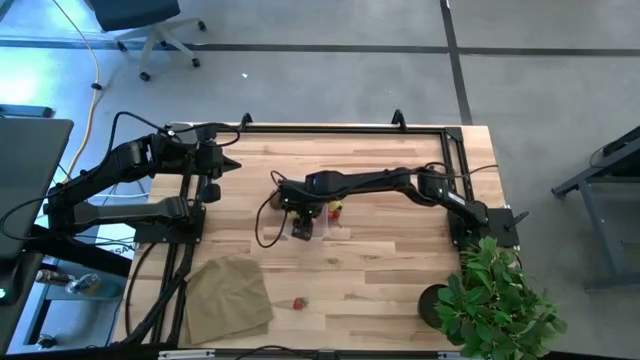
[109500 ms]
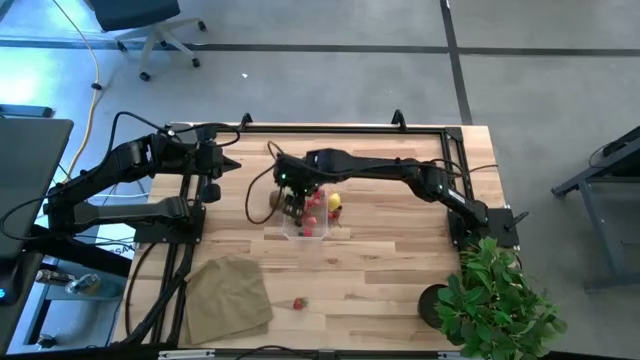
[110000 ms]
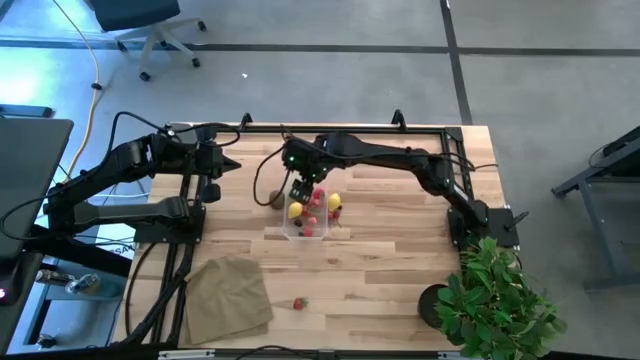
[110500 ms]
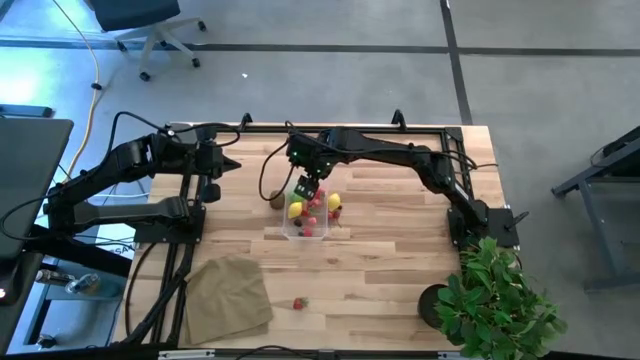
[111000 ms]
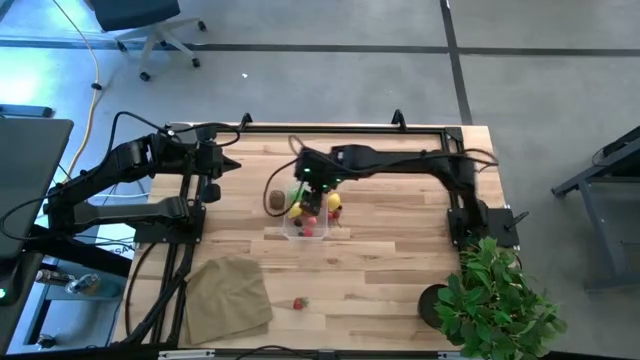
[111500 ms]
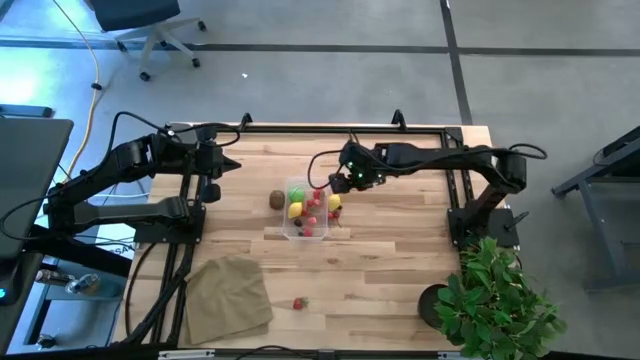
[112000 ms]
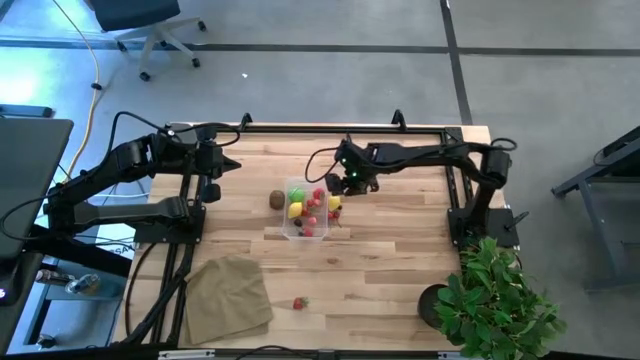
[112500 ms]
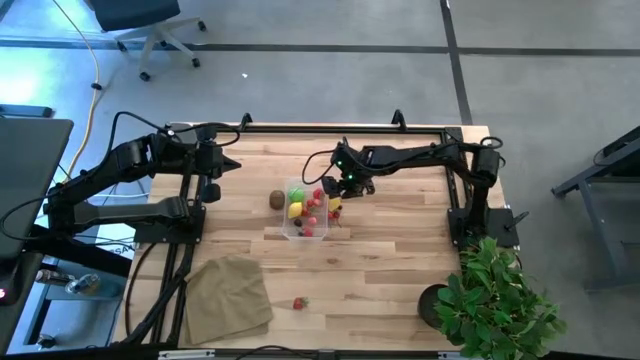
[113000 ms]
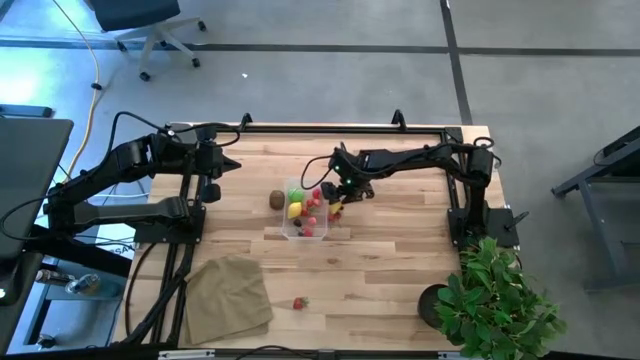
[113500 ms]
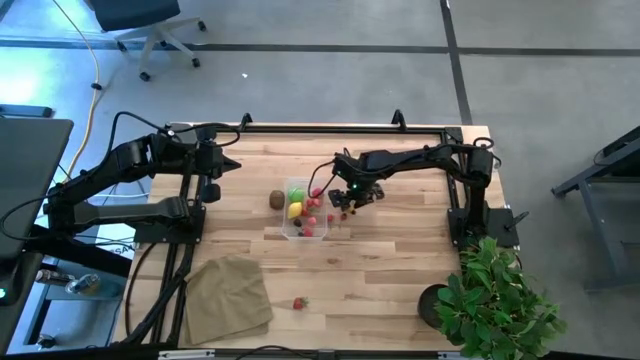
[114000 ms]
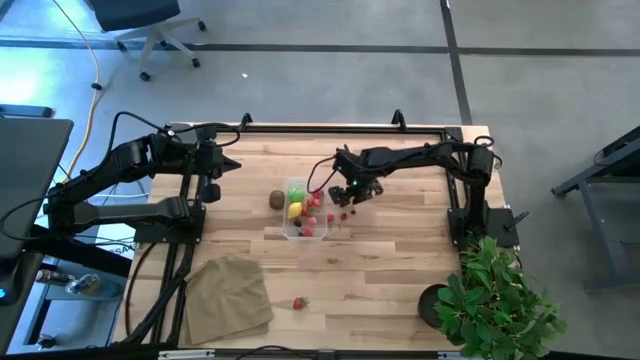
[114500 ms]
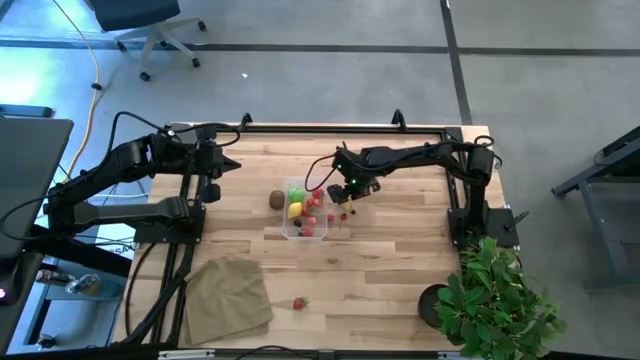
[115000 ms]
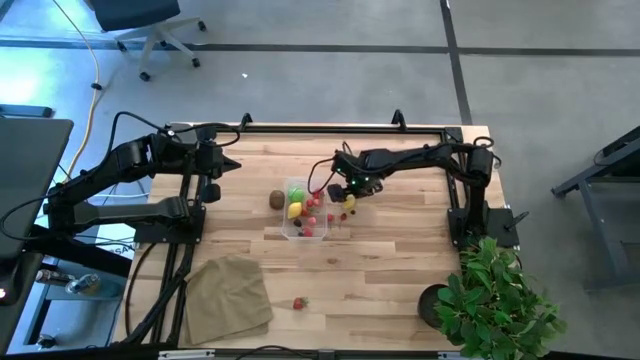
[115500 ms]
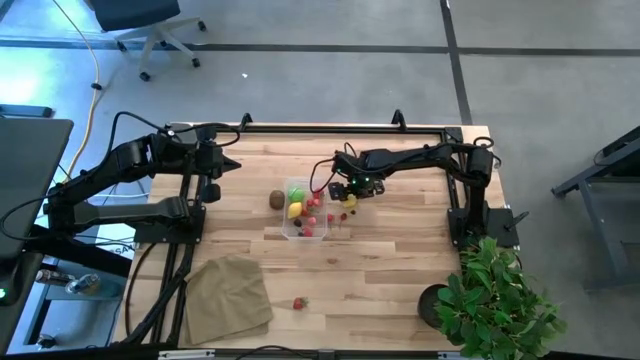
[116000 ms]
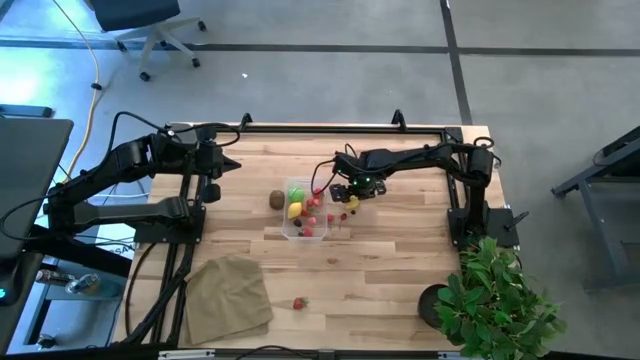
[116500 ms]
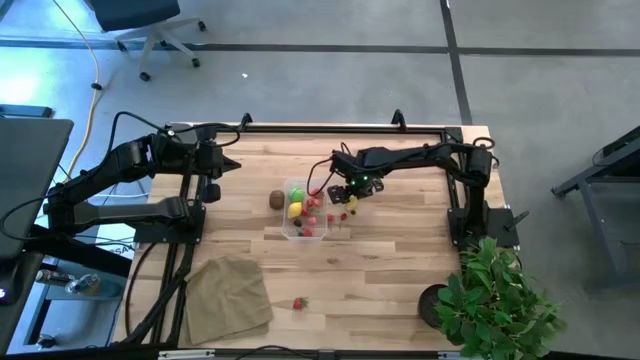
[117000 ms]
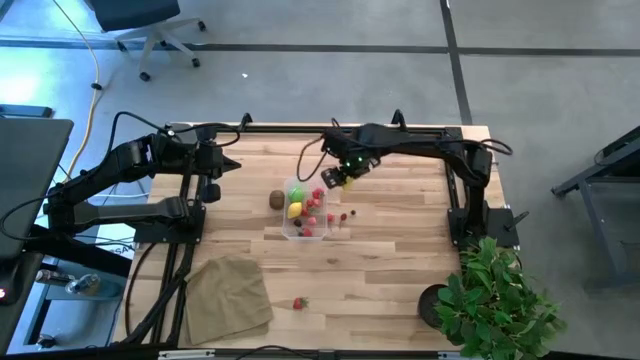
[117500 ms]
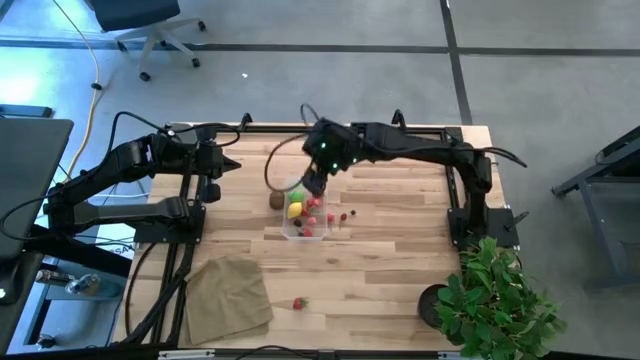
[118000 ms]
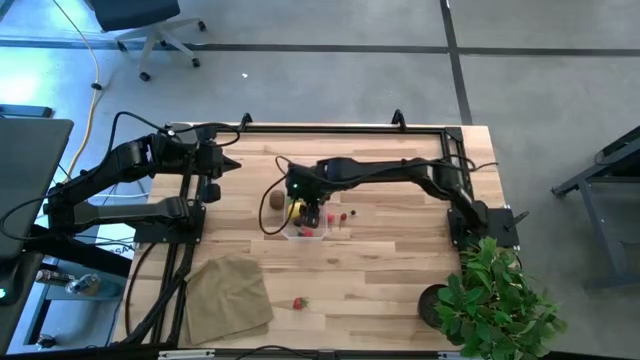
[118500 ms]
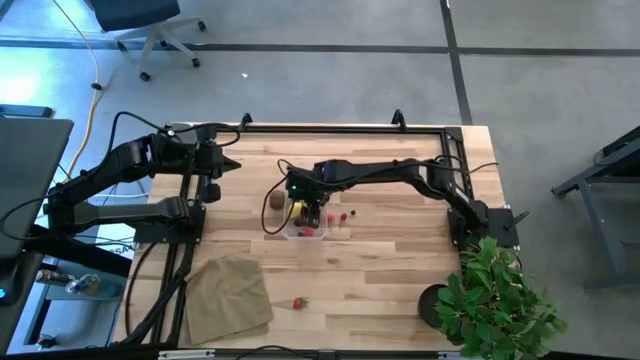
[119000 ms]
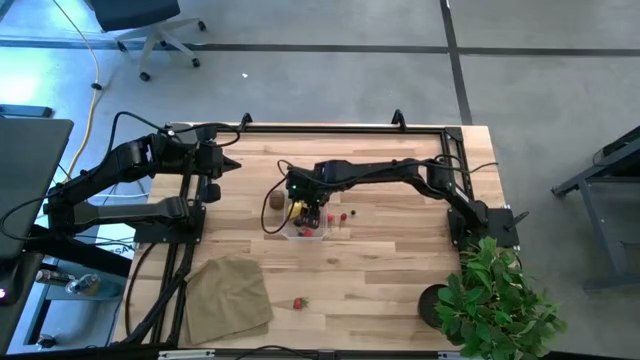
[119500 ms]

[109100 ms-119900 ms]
Task: Pick and placing Produce into tupperware
Put the lemon into the transparent bin

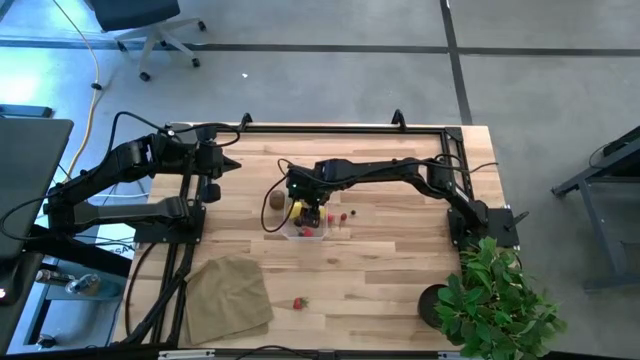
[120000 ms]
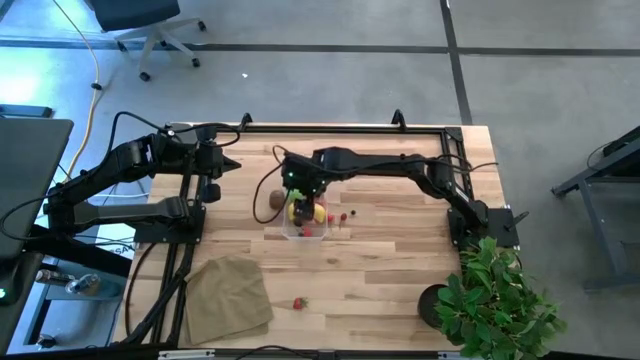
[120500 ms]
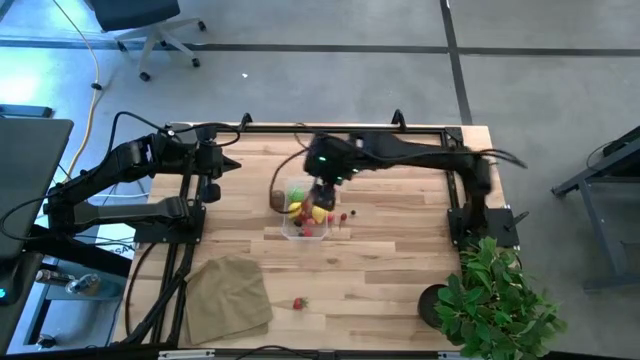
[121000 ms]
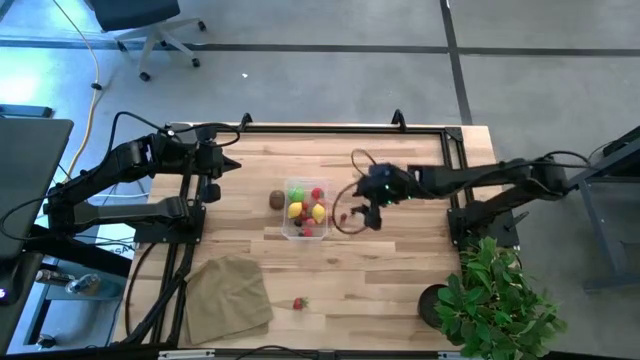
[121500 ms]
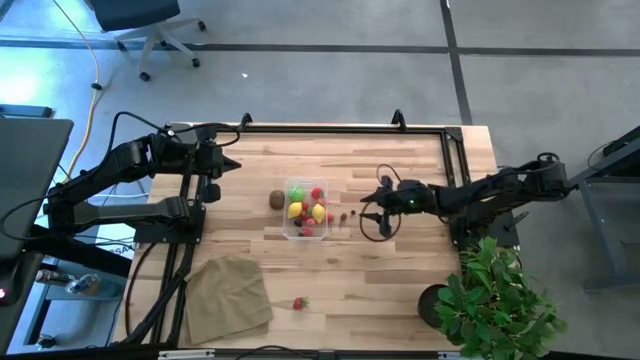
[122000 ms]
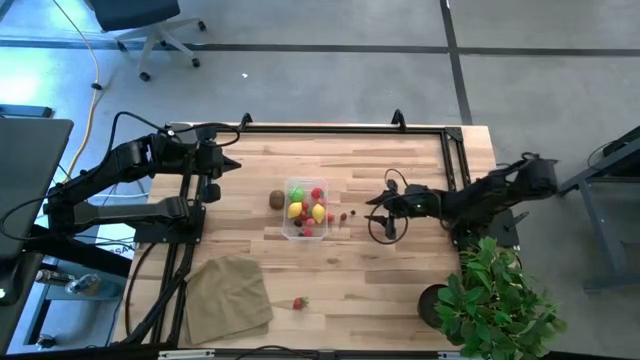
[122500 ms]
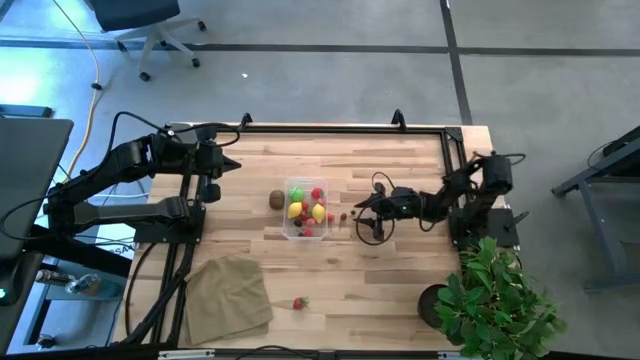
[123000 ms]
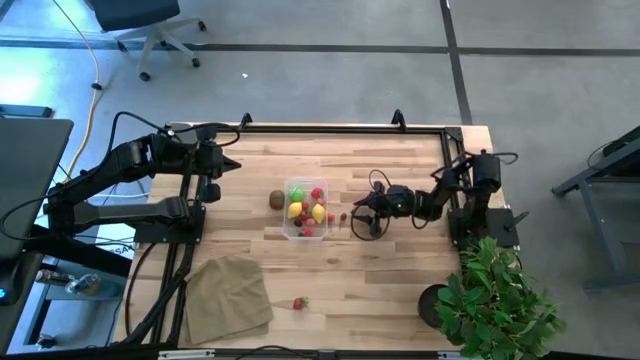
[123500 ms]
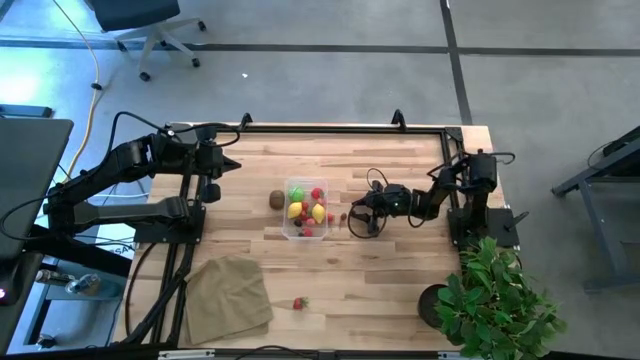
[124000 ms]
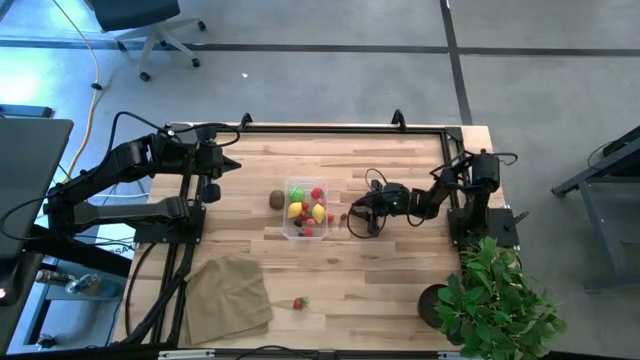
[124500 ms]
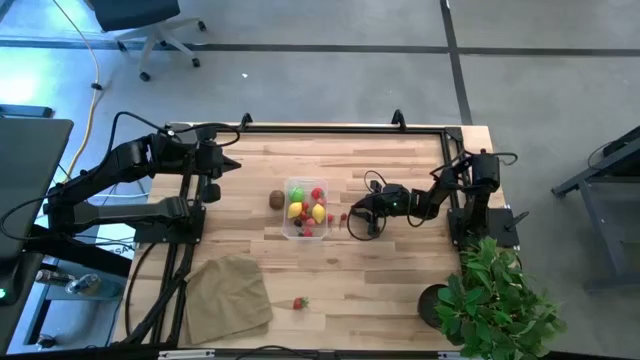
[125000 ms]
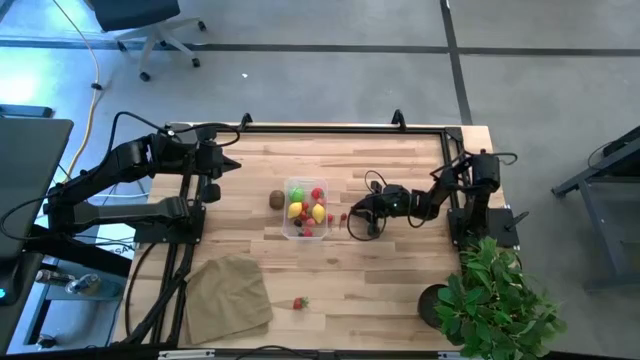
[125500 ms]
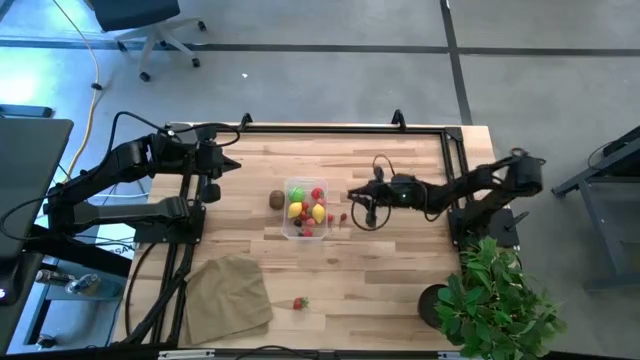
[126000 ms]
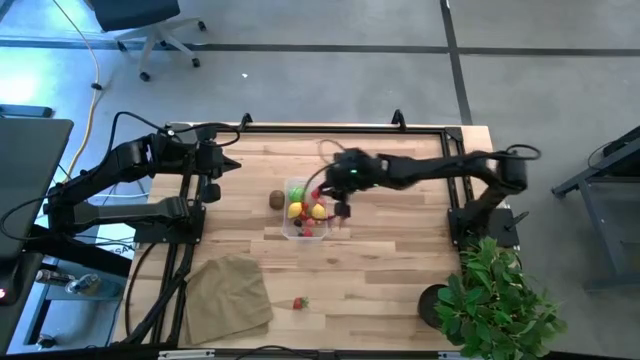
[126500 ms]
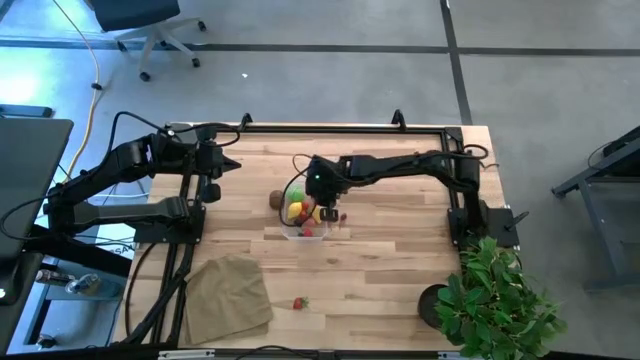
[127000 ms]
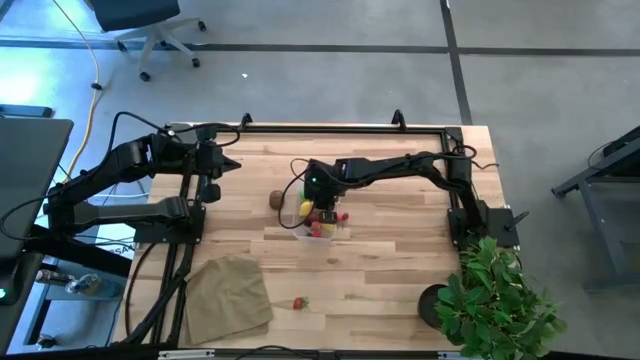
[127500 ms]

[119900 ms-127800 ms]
Put the blueberry into the transparent bin

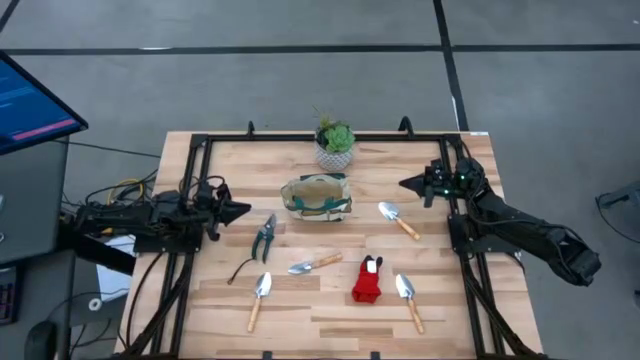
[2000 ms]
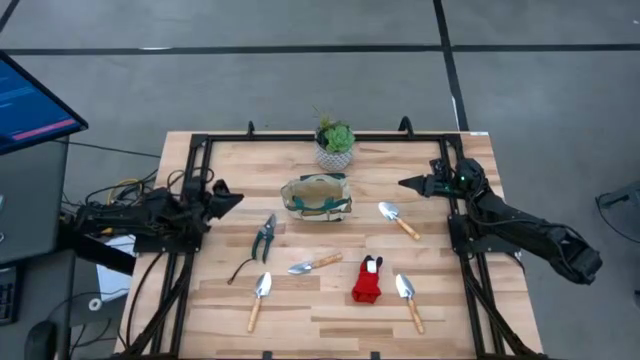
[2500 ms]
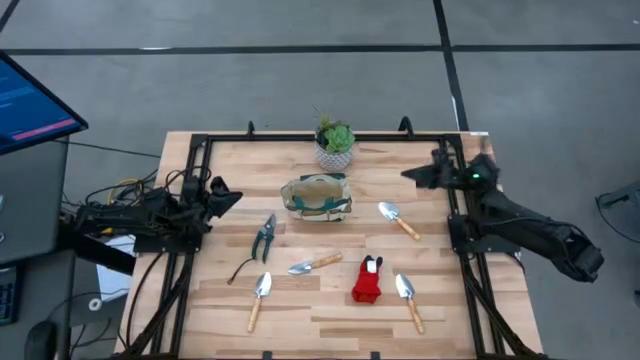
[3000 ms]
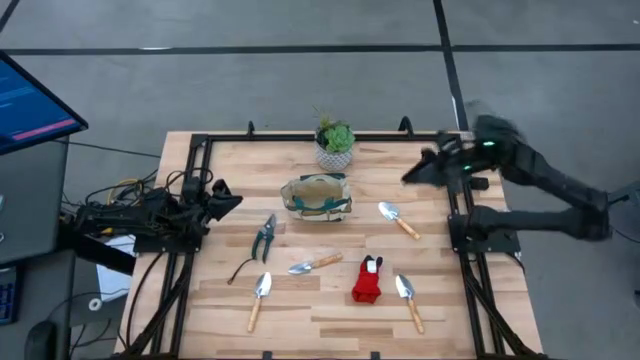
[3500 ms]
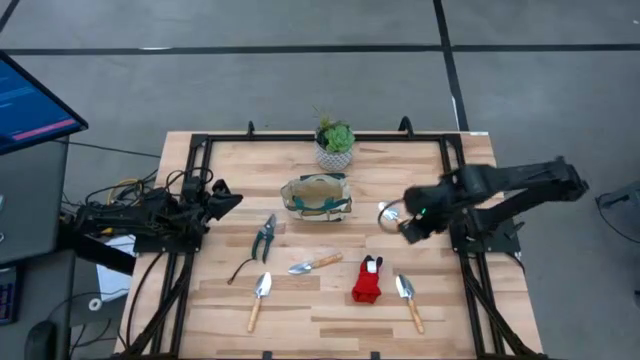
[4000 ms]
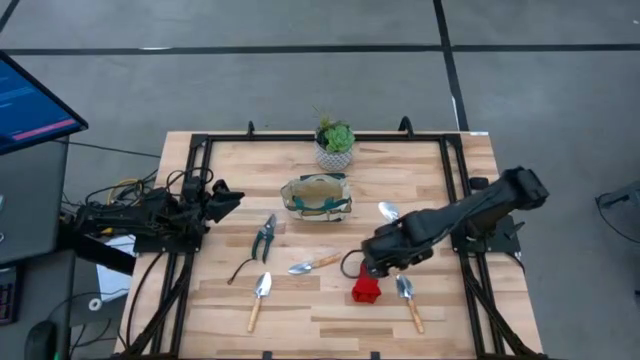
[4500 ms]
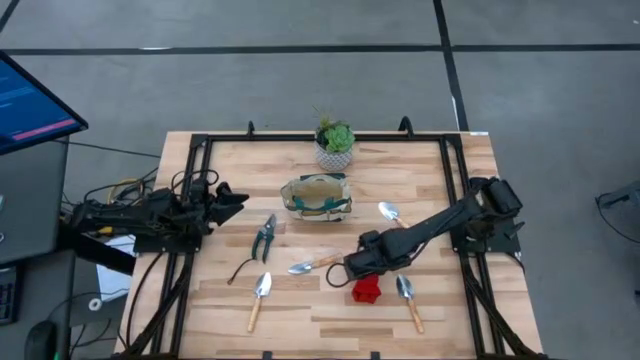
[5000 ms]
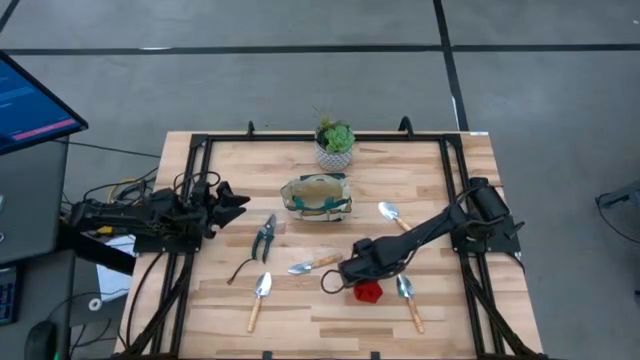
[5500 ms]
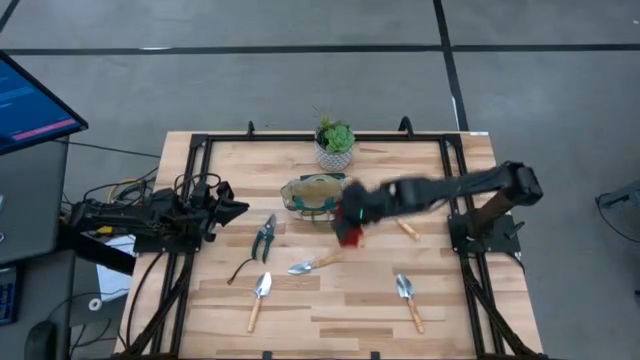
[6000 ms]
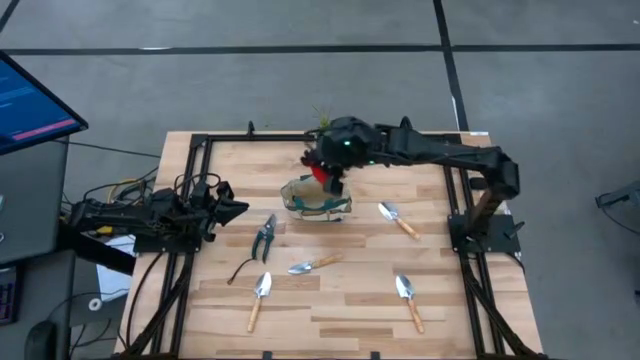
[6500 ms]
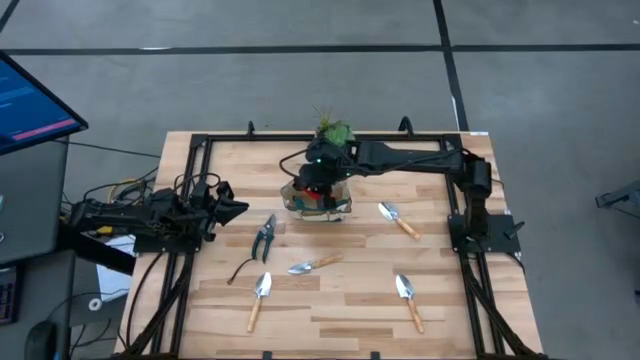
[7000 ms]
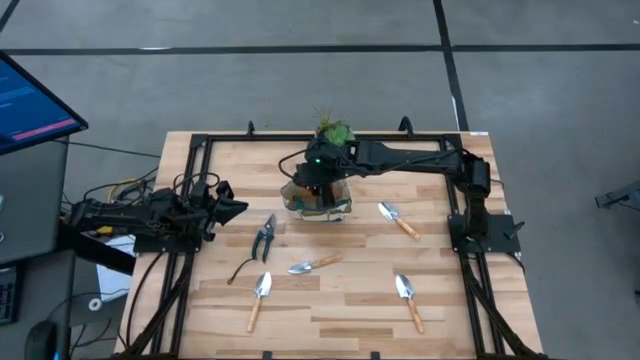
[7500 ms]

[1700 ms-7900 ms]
Task: Pick & Place Garden tools in Gardening bag
Put the gloves into the gardening bag
